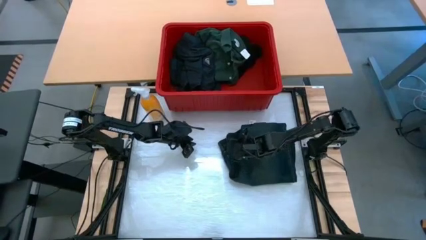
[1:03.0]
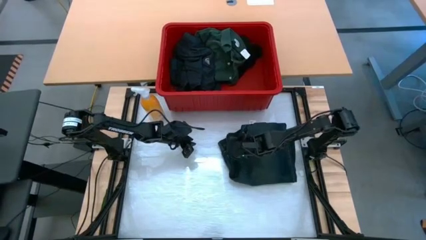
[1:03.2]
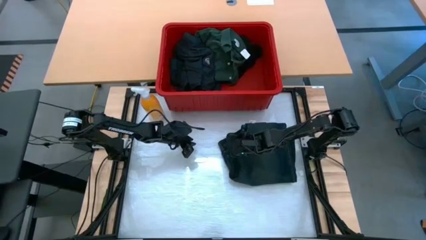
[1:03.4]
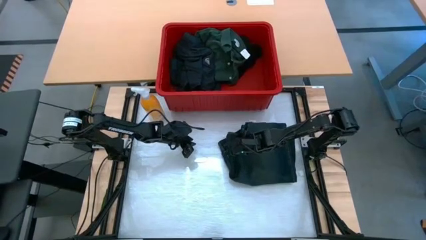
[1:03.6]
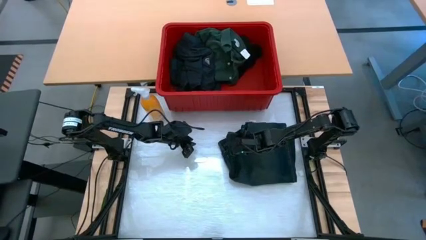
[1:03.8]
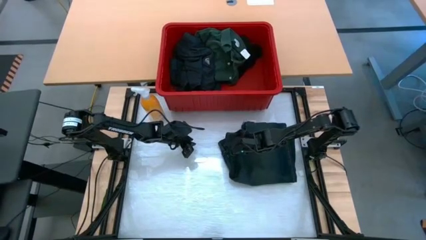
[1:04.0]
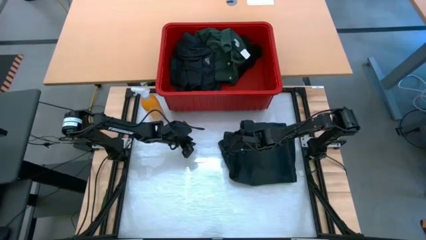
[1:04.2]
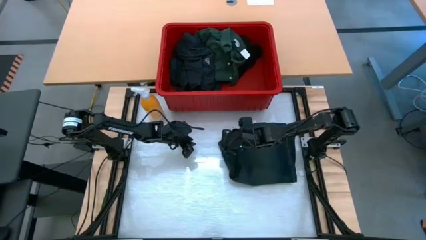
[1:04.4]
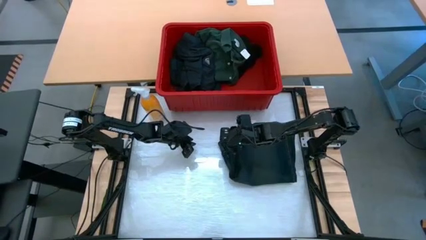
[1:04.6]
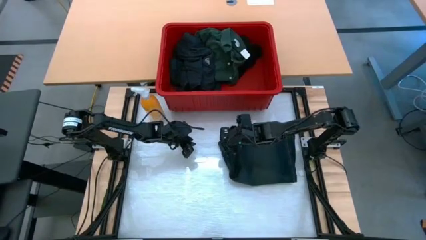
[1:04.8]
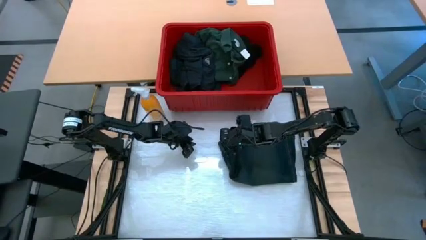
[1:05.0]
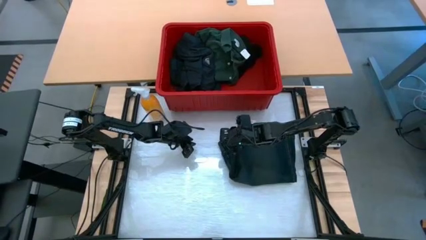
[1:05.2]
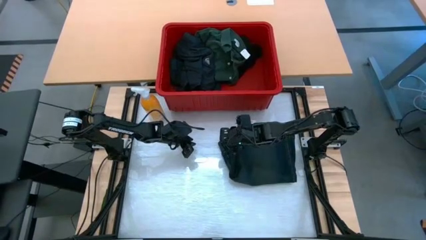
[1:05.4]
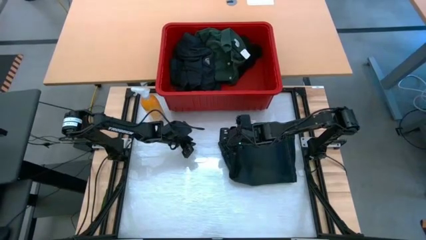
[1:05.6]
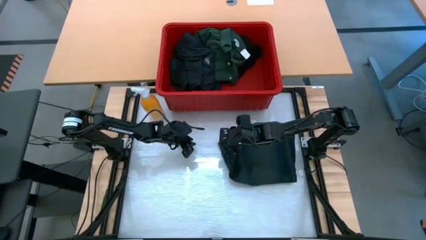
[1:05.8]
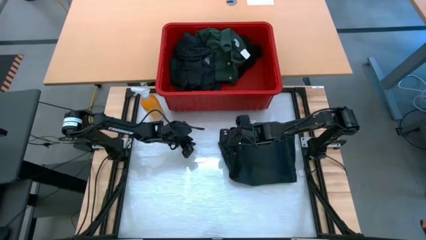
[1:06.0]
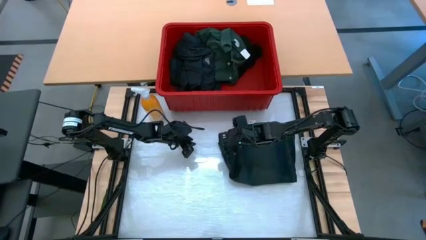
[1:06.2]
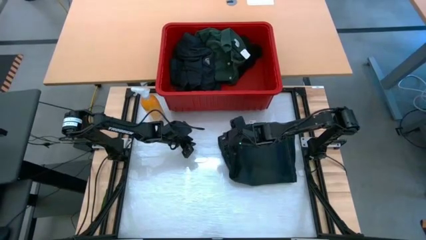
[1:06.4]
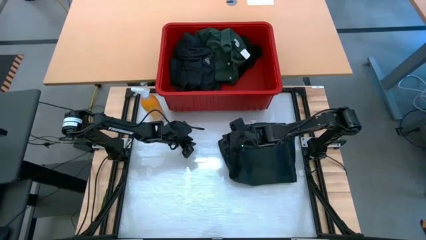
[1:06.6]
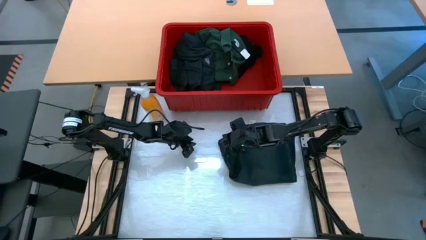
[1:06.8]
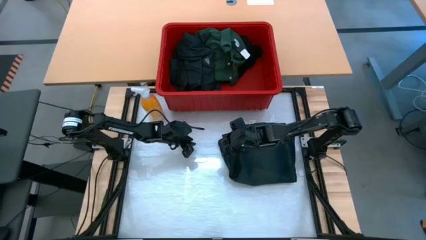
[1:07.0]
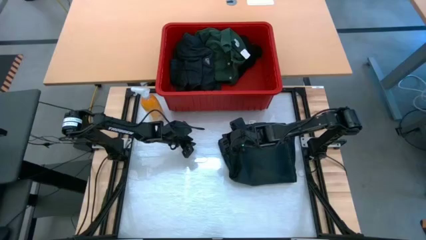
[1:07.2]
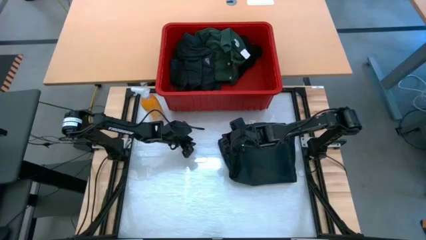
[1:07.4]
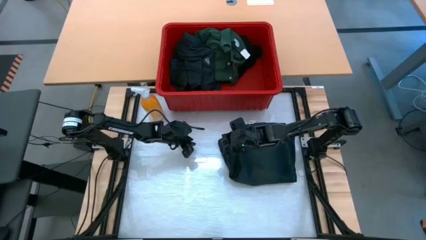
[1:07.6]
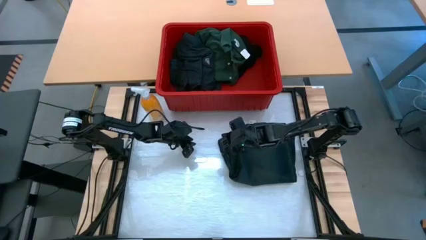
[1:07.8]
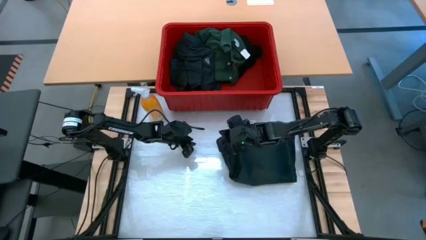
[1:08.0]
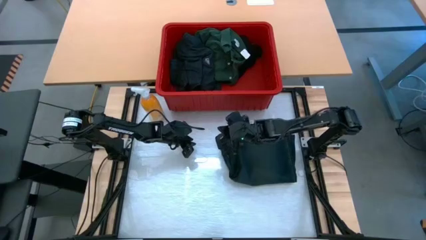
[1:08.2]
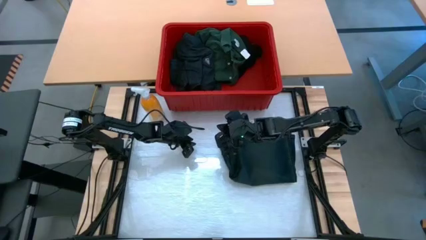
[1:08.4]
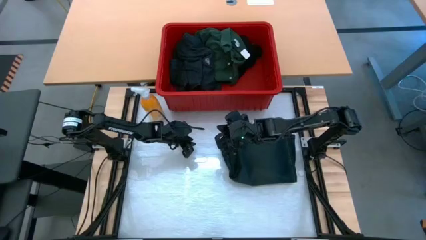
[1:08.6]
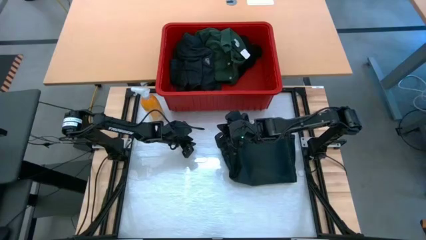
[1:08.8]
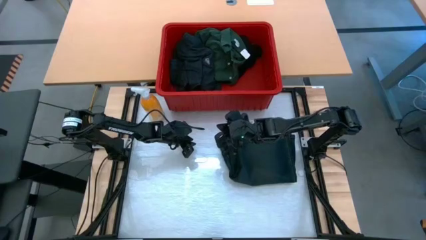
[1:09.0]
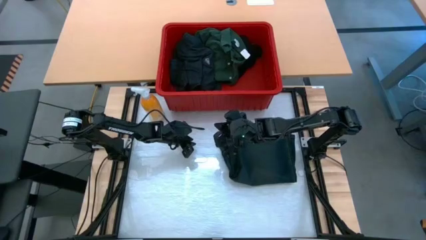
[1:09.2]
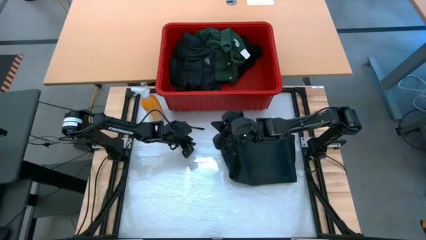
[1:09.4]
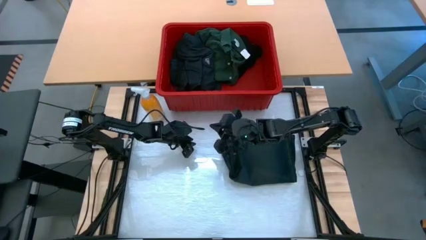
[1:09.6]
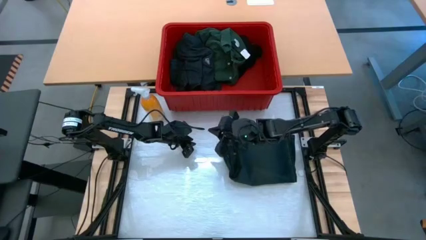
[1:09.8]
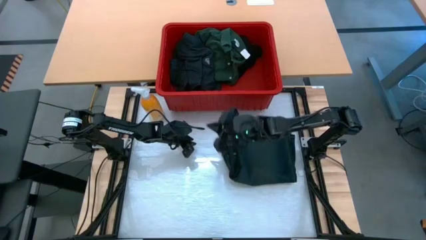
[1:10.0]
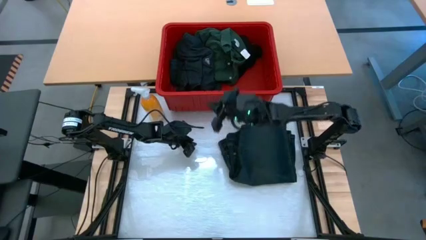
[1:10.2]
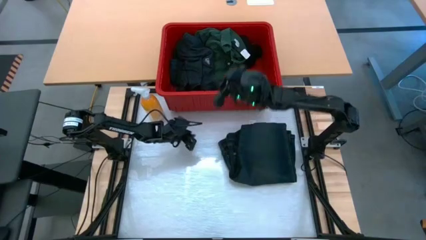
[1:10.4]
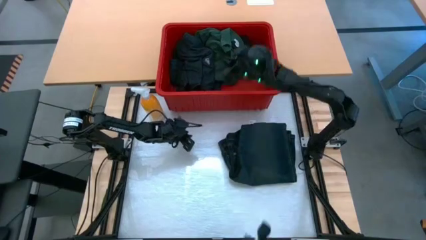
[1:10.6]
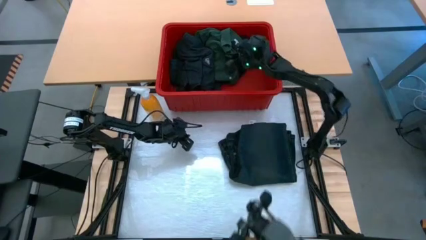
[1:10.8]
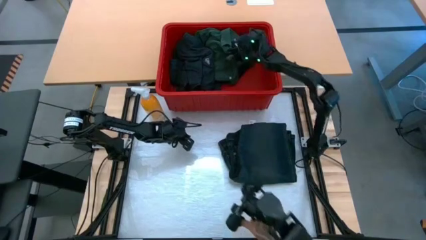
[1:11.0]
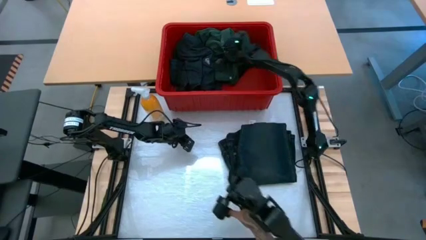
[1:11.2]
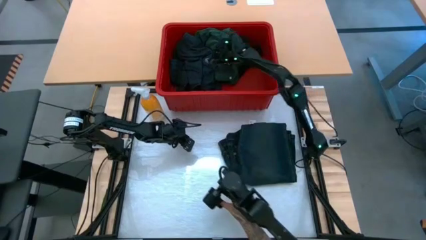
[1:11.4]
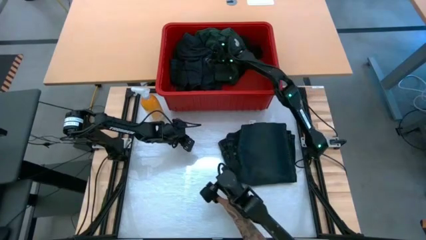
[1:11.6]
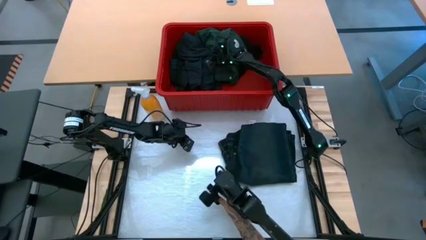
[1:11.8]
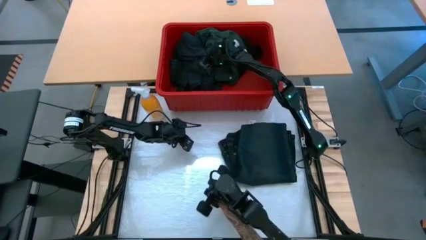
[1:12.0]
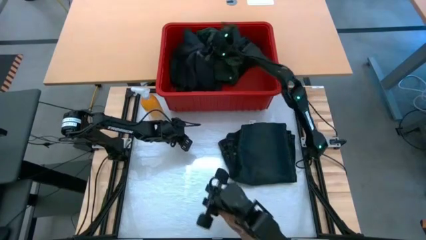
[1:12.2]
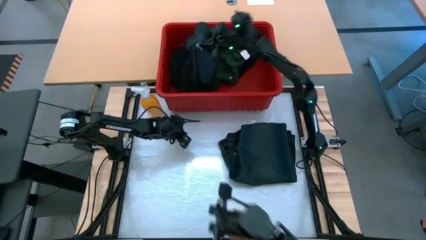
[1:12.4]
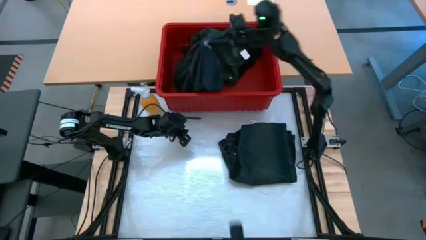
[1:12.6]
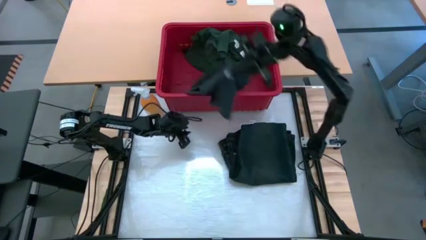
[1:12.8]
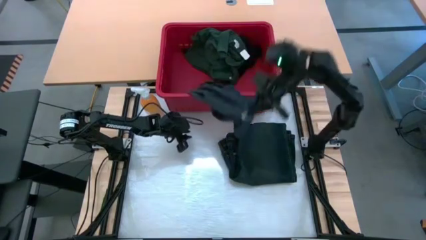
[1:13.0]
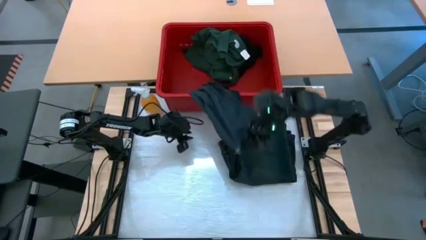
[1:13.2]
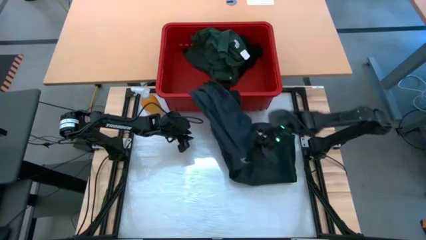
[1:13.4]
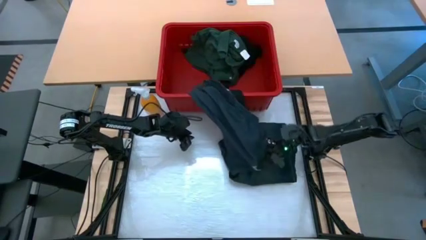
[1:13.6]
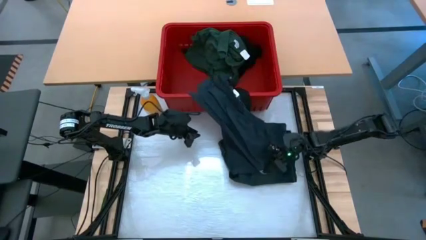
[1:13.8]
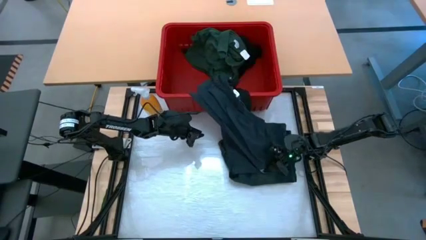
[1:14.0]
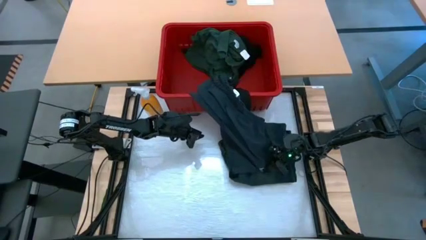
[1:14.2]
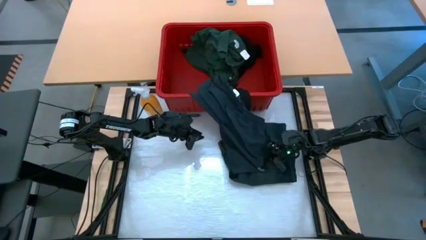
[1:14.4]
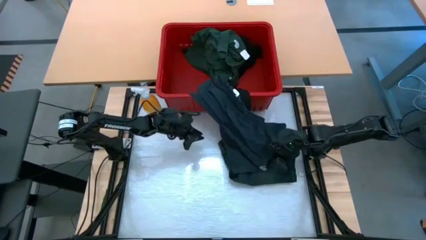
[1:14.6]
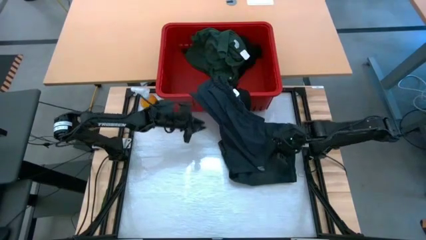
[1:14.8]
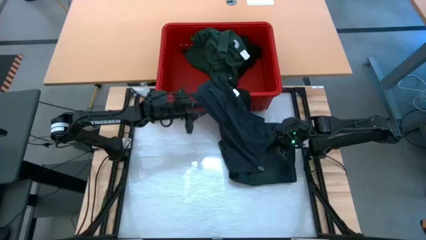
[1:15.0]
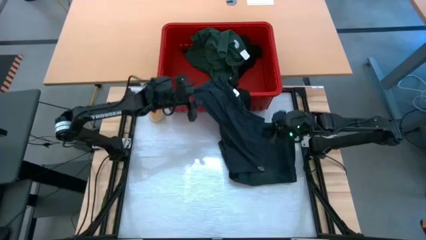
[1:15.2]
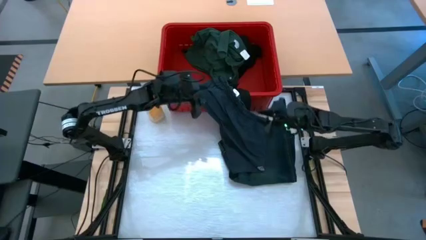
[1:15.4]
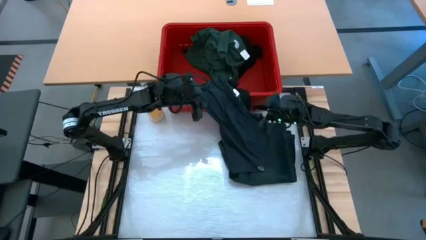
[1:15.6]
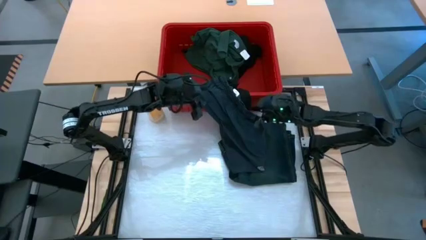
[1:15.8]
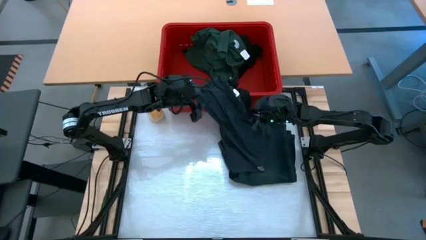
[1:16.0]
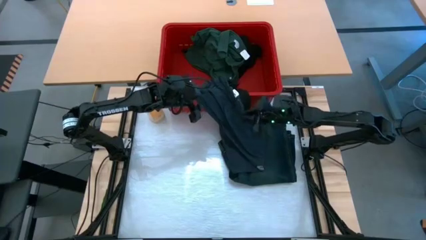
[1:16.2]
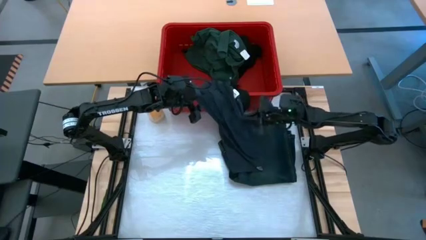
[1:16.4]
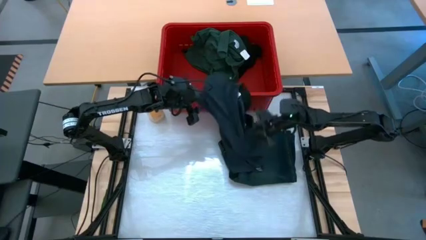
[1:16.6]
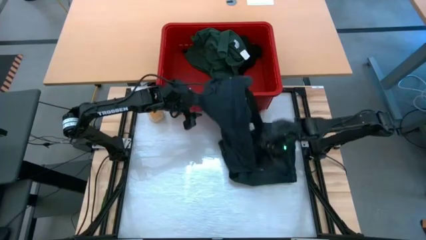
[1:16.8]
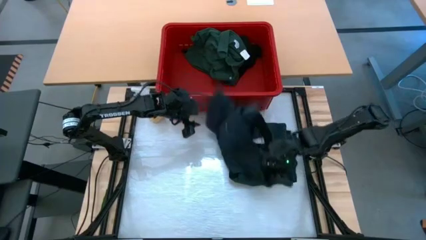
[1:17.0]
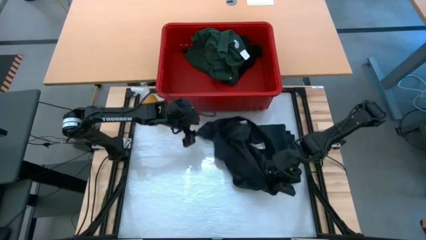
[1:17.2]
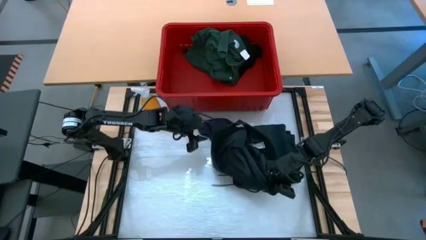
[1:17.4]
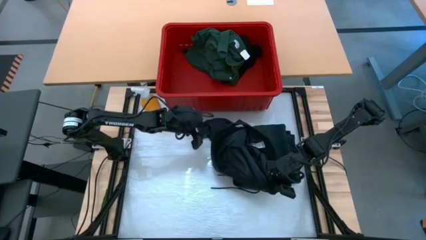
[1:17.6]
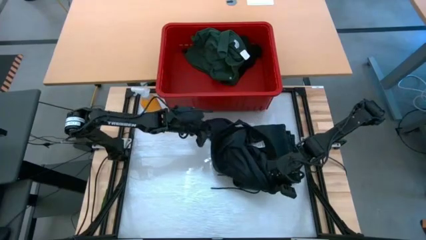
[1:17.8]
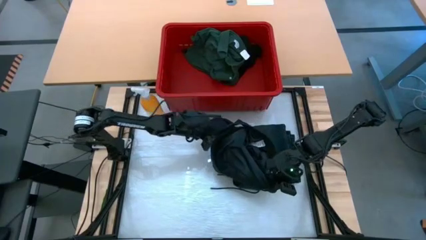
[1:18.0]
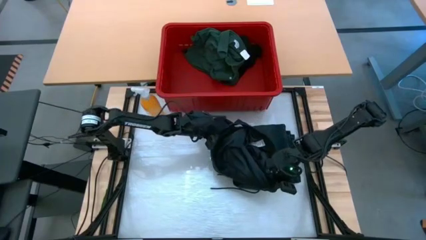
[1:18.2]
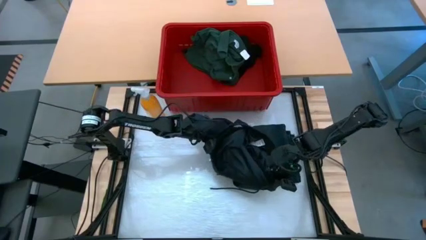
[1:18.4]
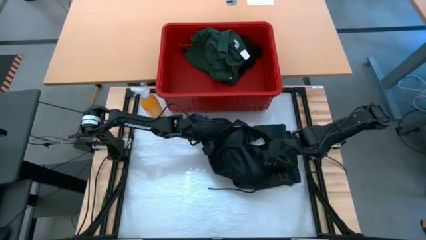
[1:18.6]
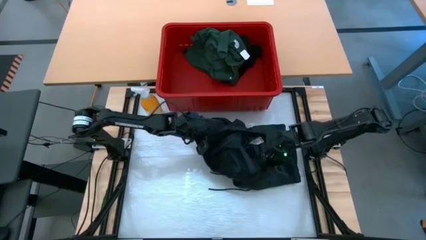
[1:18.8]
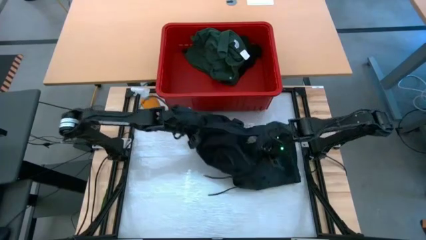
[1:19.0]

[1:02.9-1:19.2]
Task: Fold laundry
Remove the black shorts from the red bin
